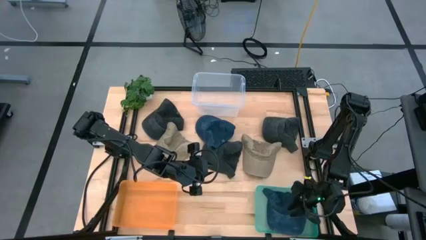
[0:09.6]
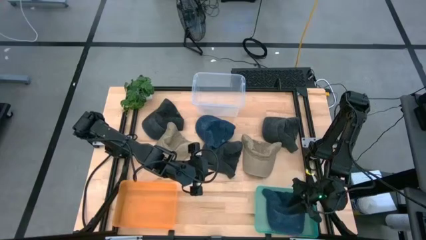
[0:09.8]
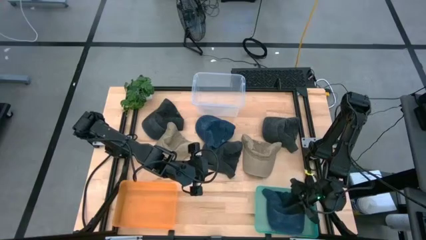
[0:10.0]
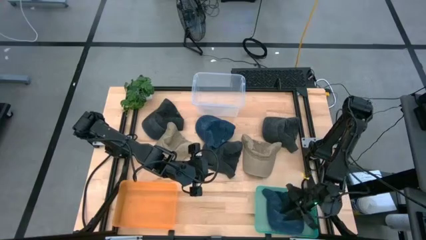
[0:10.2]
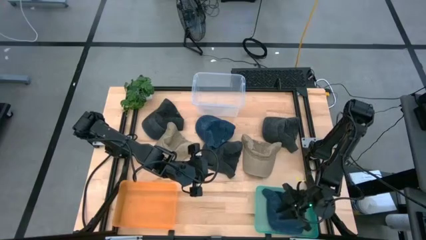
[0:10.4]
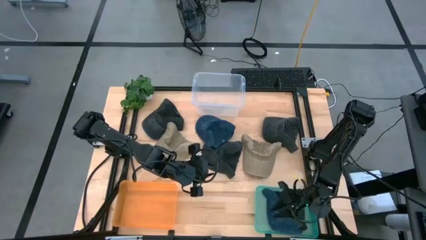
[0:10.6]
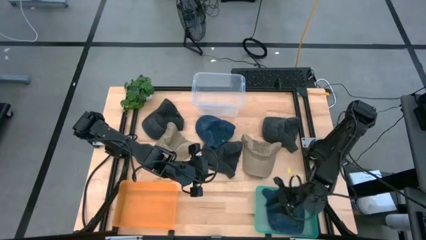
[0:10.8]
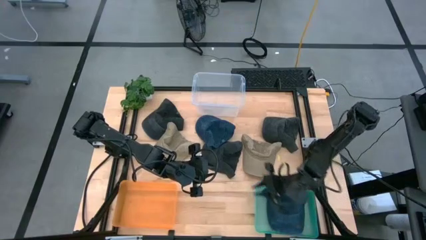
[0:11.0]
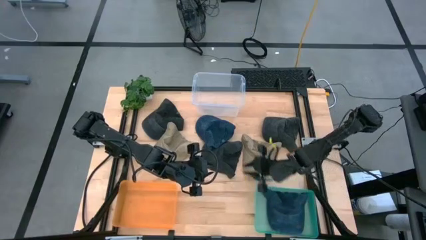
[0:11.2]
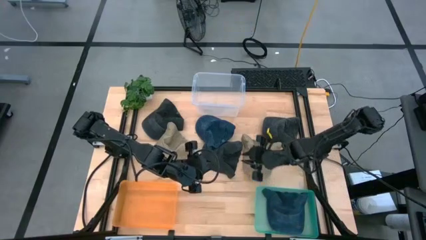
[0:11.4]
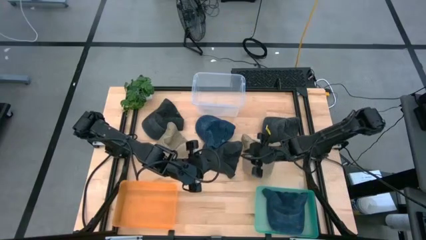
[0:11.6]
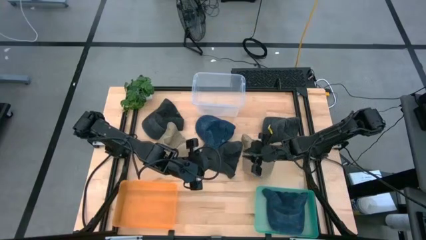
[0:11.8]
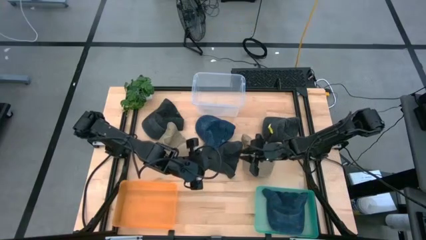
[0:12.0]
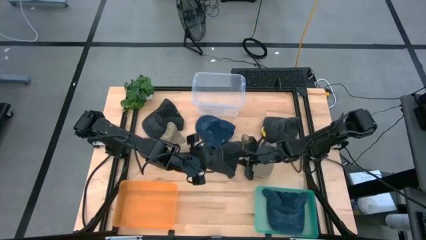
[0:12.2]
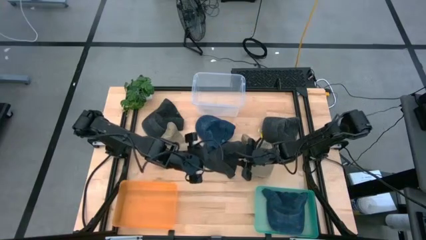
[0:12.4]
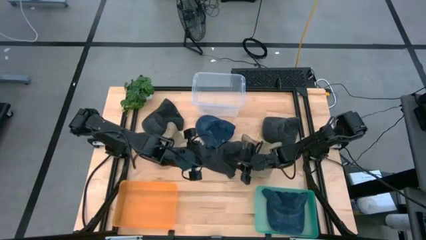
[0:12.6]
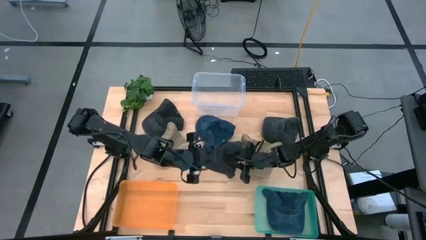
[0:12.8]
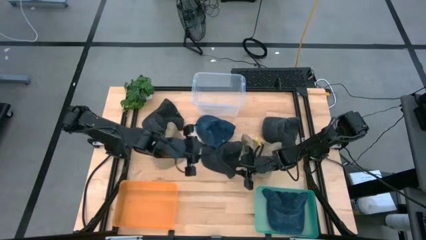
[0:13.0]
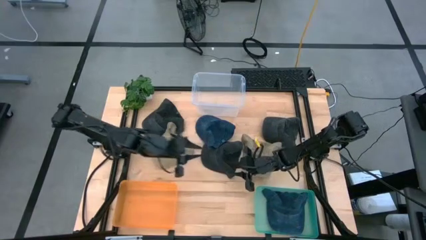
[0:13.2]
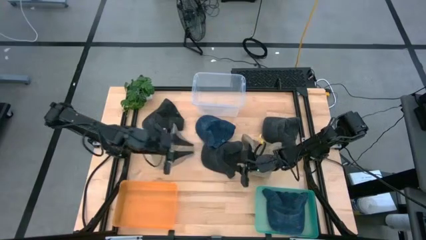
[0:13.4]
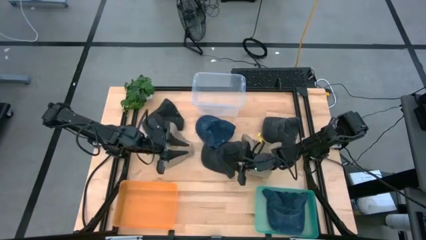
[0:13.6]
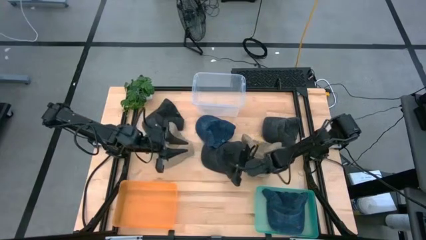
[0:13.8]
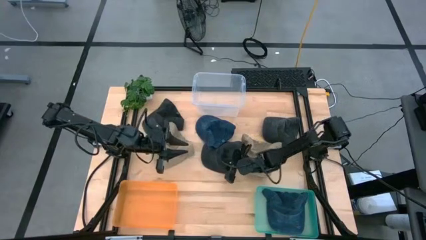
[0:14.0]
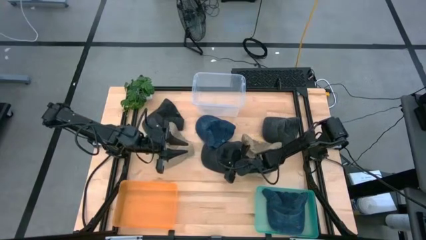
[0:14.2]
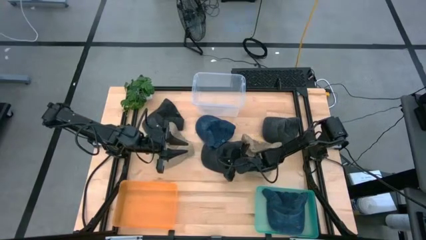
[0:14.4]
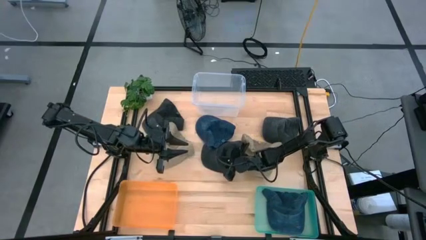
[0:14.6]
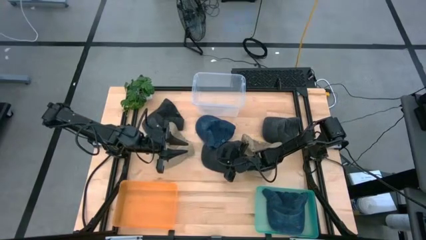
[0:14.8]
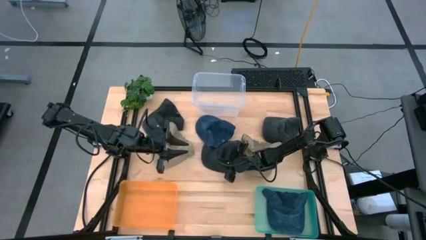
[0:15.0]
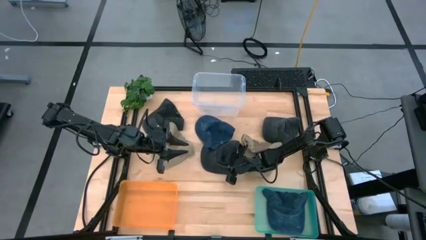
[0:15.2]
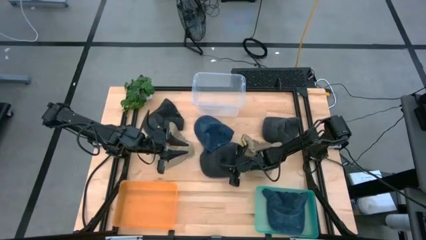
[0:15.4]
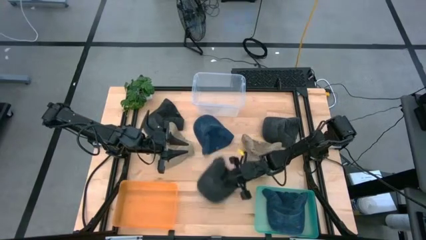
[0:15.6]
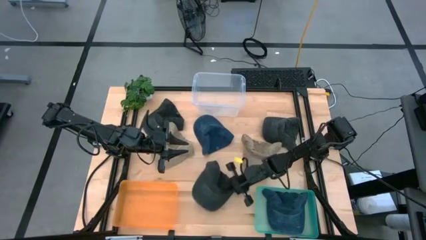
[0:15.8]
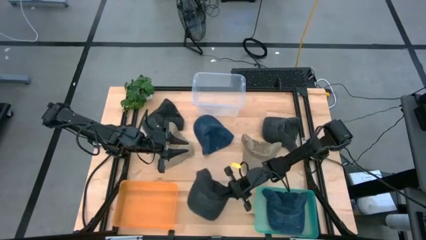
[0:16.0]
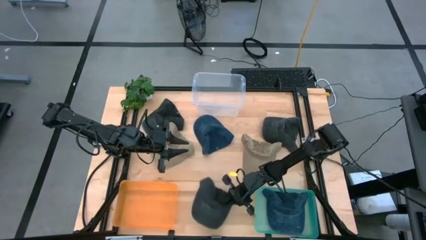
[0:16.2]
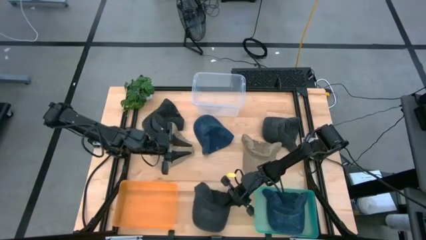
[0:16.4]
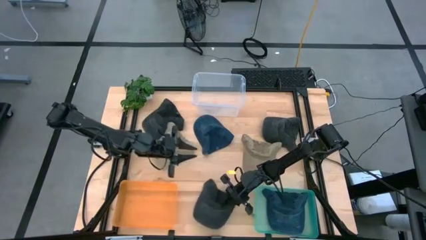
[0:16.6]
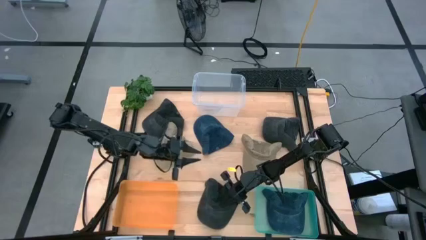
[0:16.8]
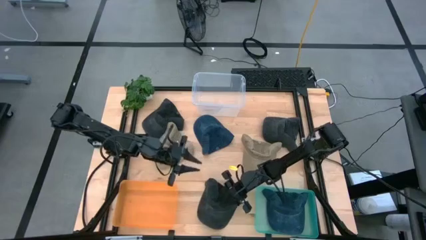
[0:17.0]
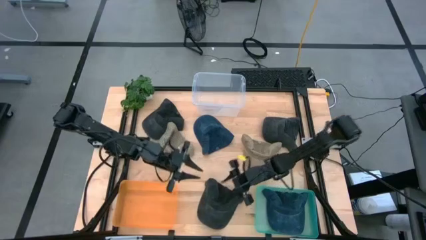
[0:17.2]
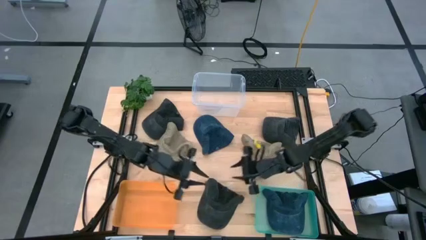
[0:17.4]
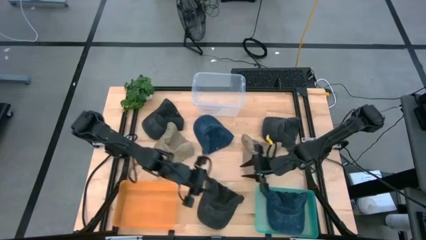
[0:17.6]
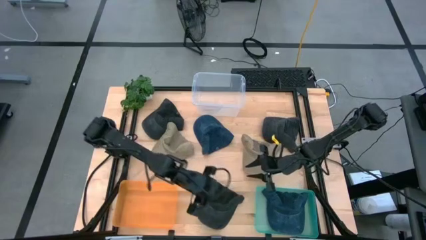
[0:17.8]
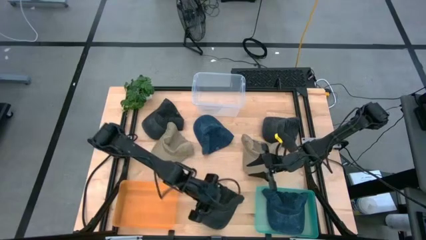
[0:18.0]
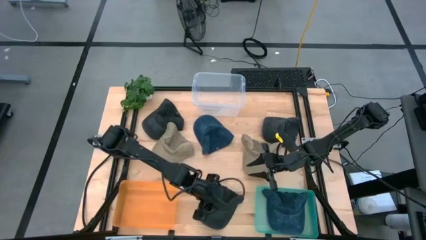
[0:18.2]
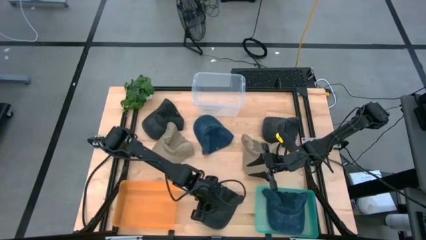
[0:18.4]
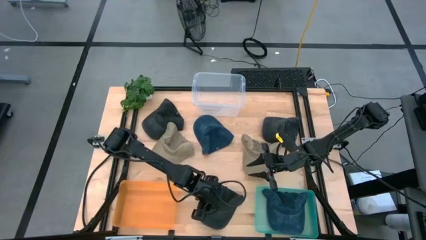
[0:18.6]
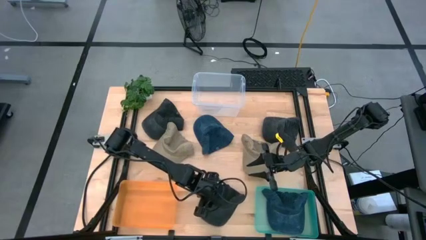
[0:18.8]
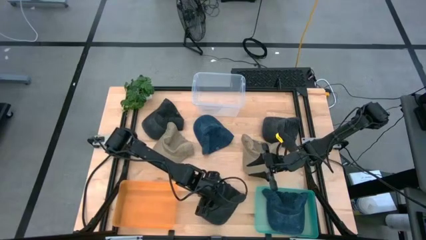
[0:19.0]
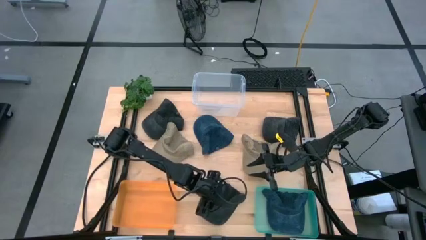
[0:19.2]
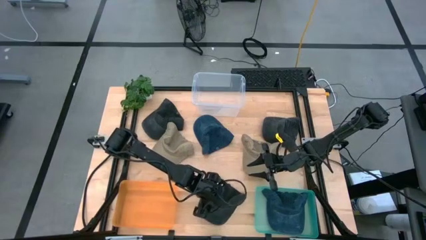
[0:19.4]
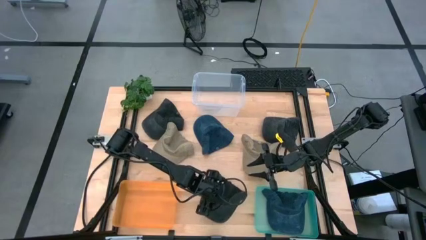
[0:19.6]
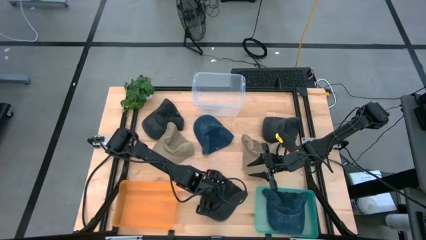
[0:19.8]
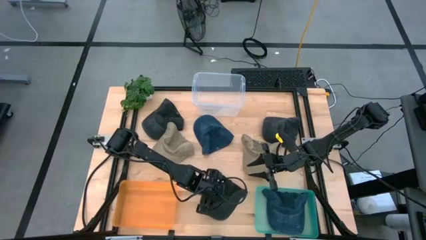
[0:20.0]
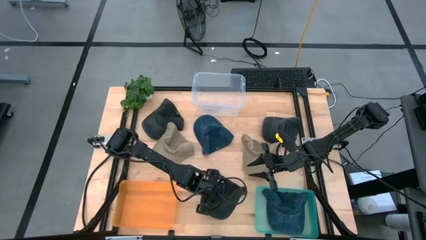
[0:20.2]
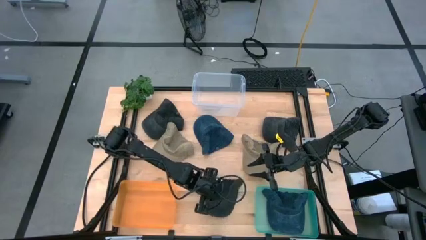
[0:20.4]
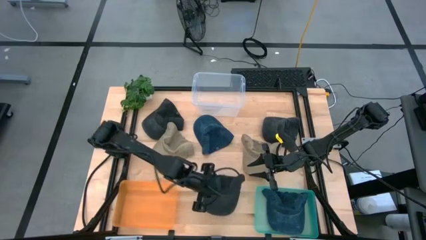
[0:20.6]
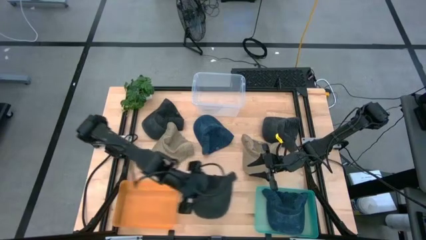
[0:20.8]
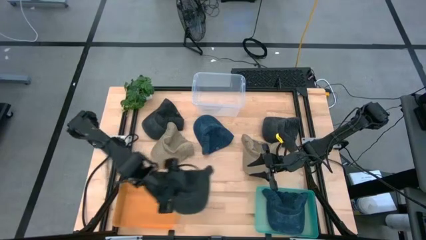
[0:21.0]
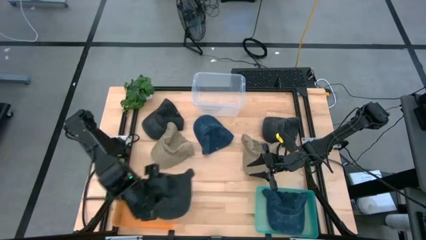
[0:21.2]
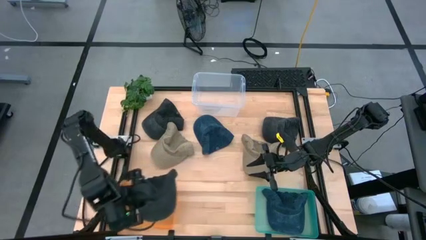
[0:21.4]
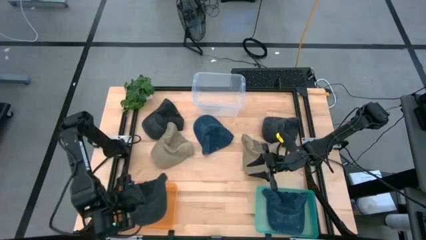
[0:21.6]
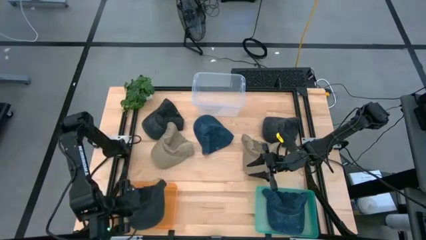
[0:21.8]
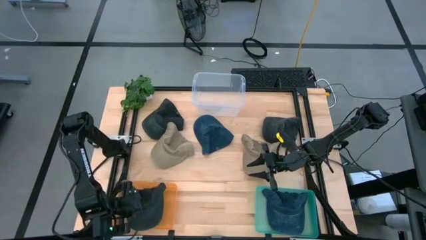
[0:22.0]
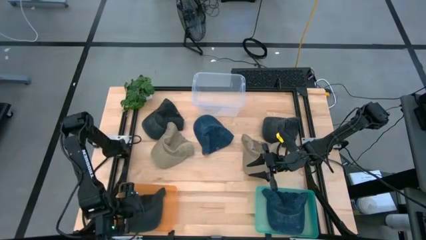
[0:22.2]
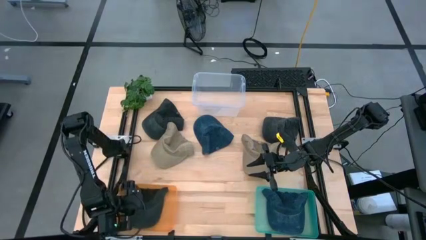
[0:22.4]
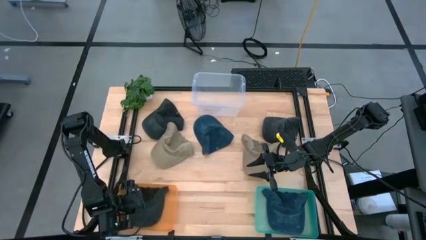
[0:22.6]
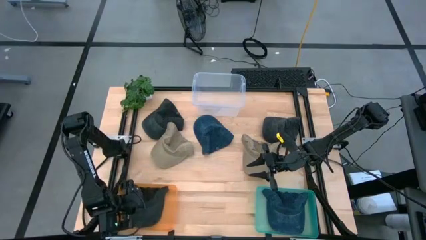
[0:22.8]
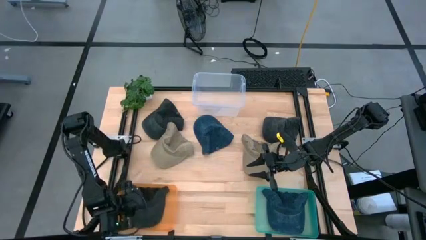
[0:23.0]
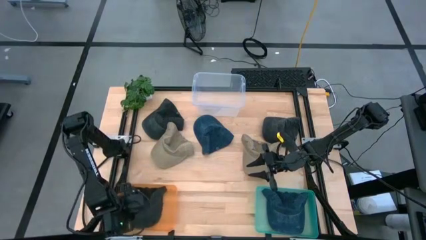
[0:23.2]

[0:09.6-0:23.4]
Task: Pick & Place hat
Put the bottom black cap into the orange bin
